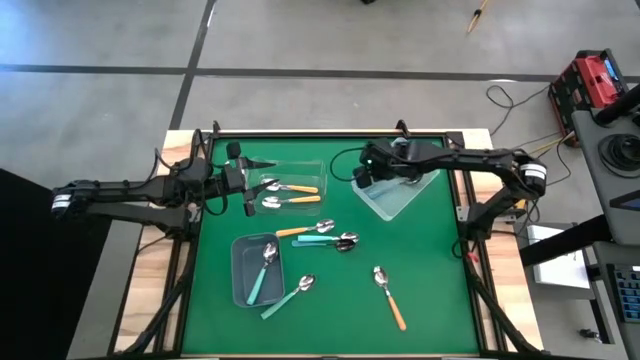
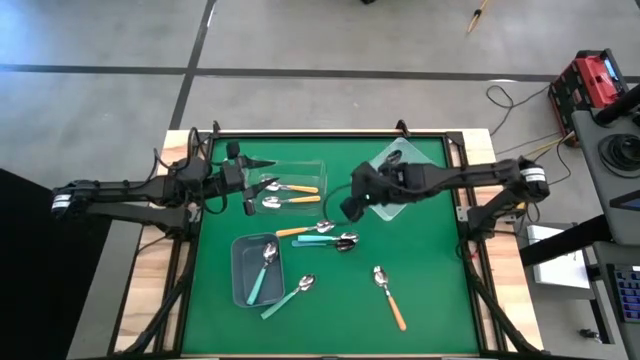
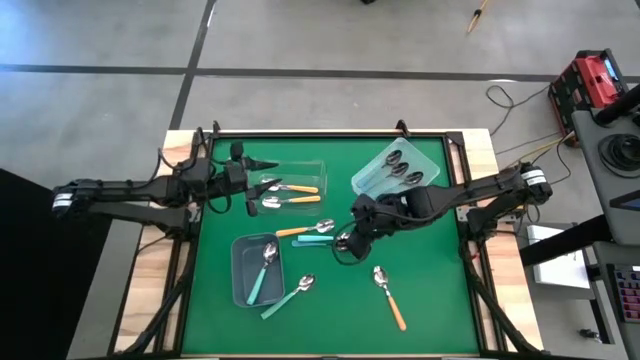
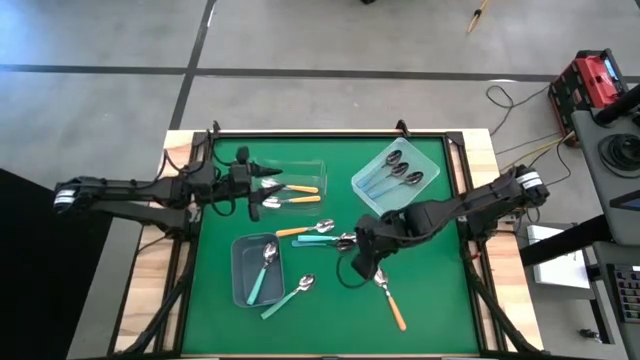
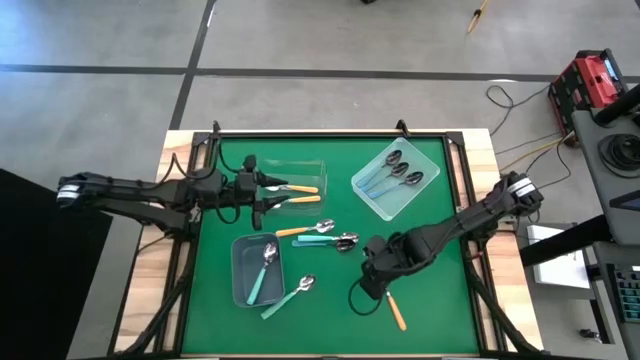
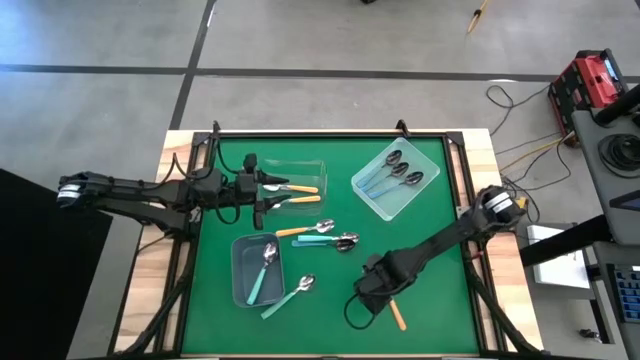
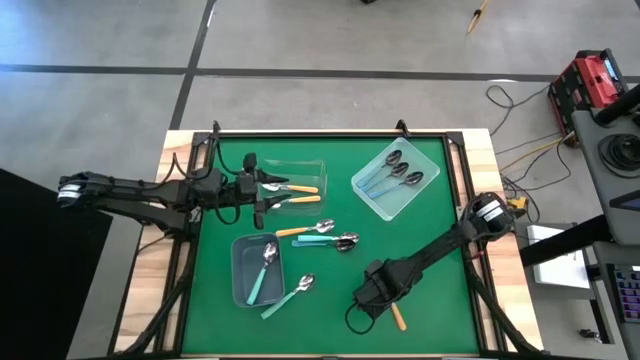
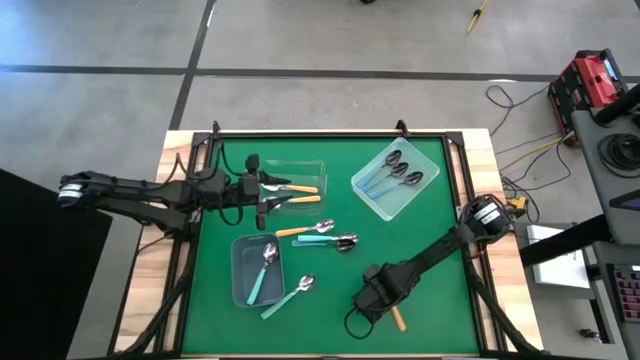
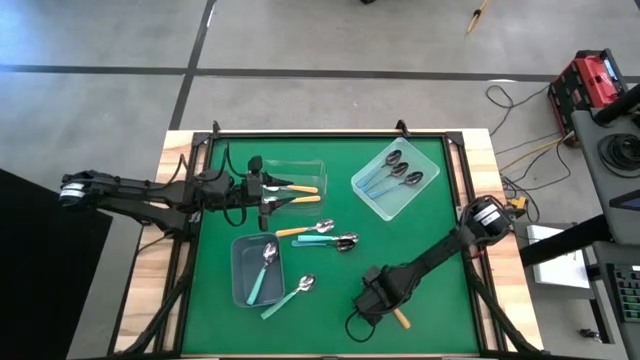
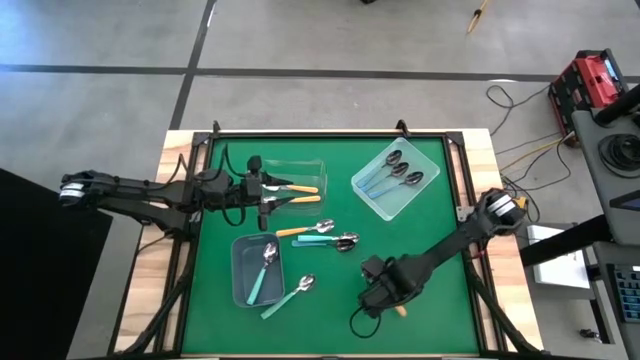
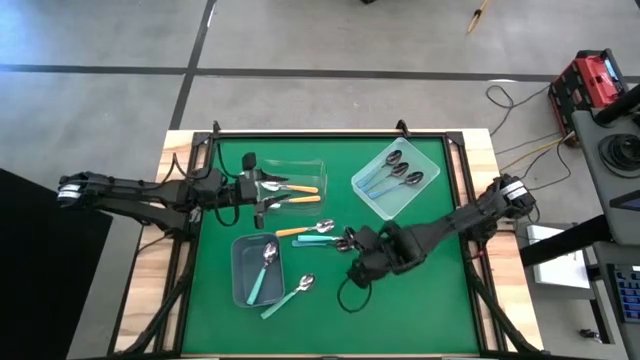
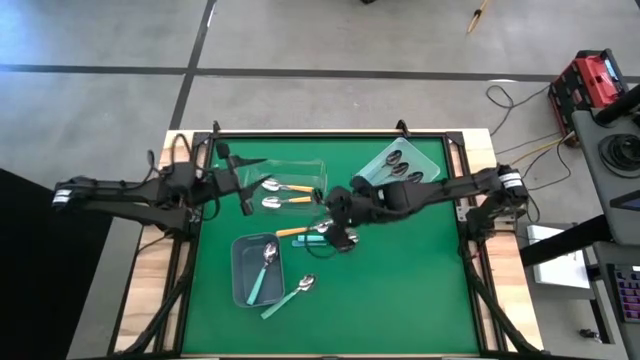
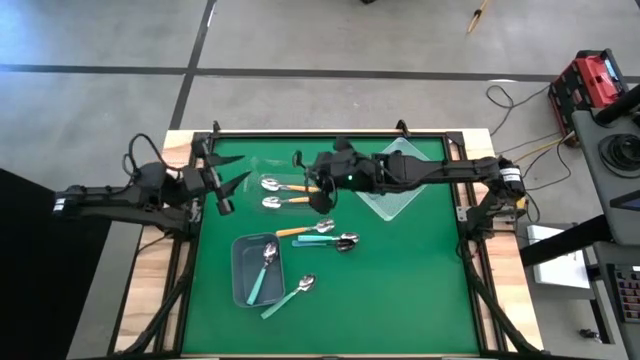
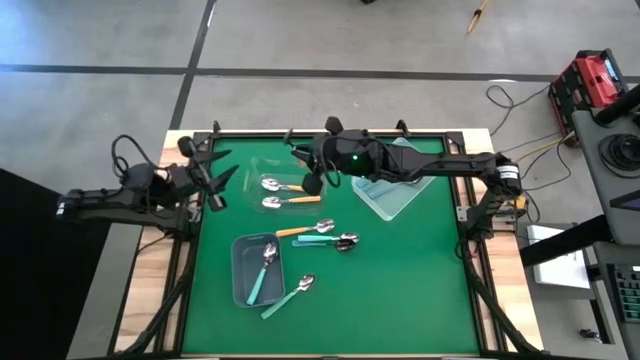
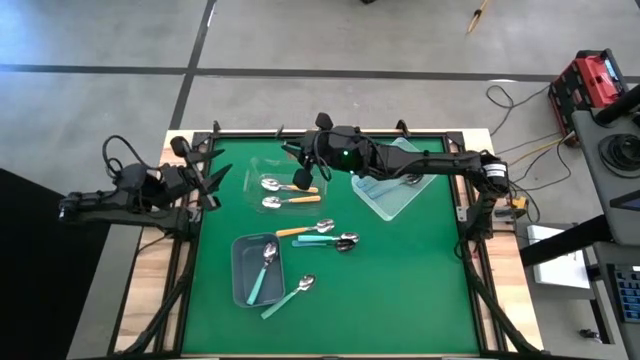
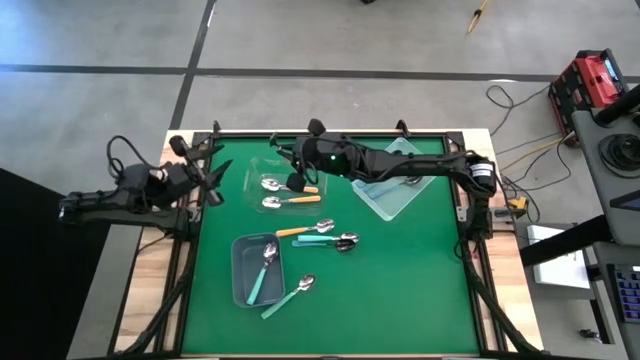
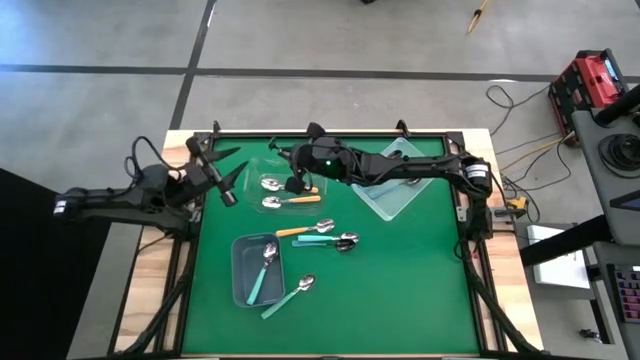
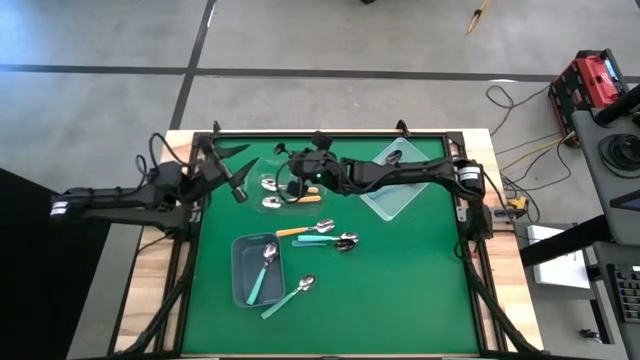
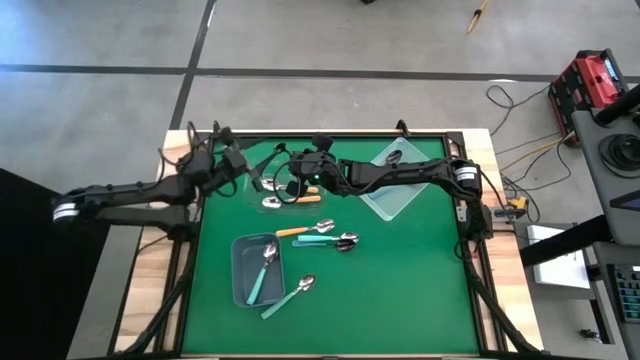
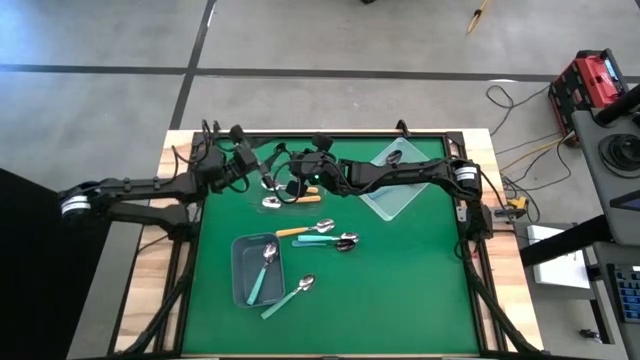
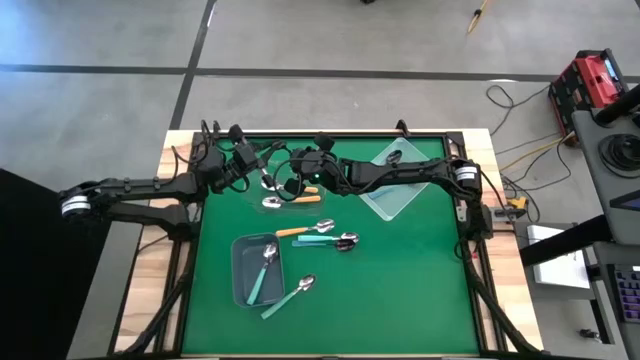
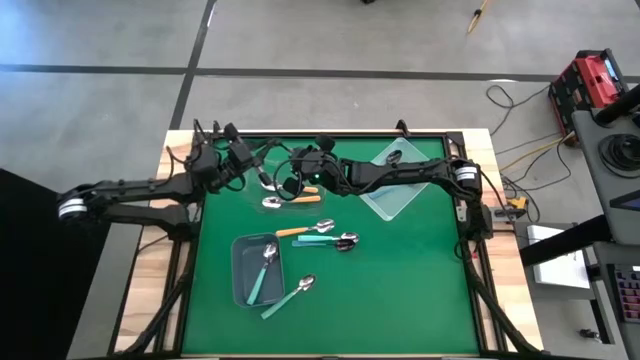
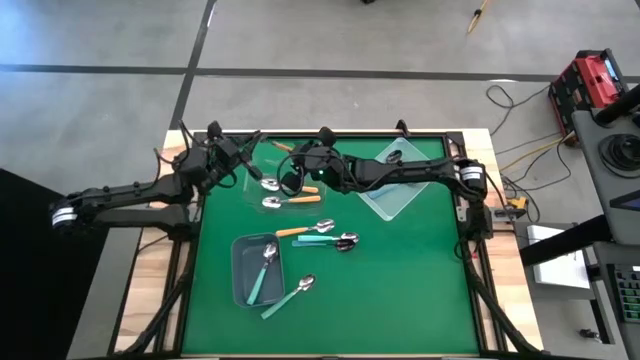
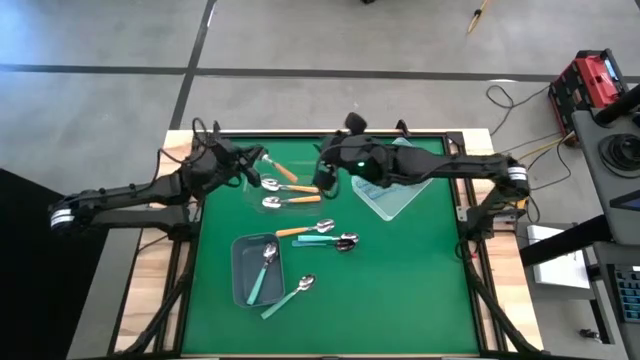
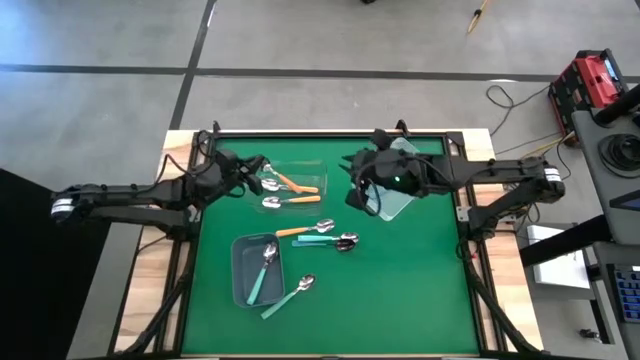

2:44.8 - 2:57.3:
Task: Sort silverware by color (type)
Put the orange spoon into the transparent bin

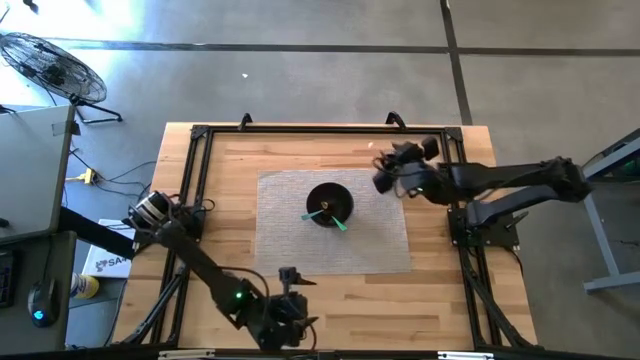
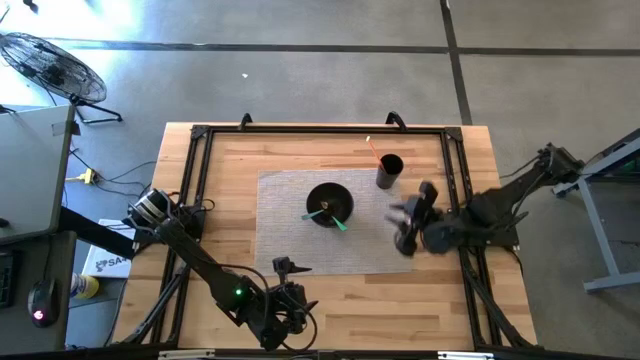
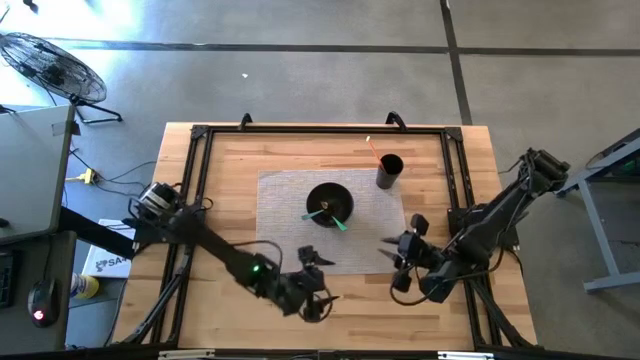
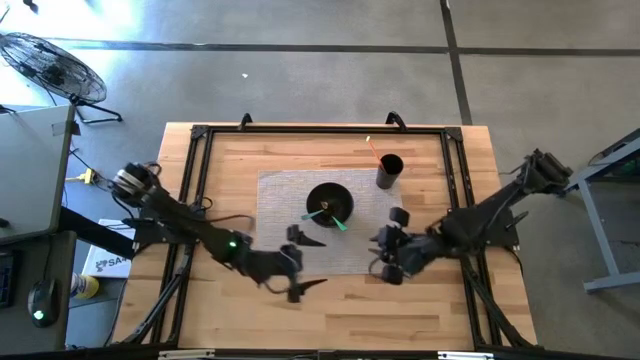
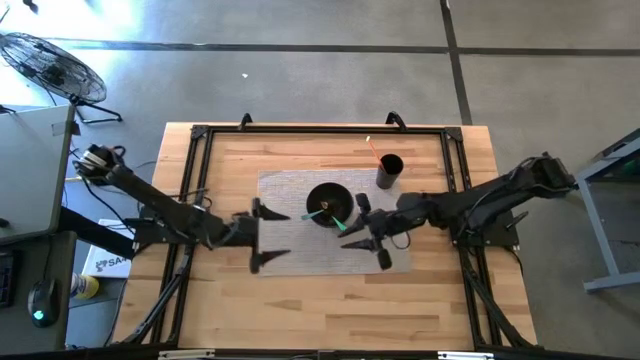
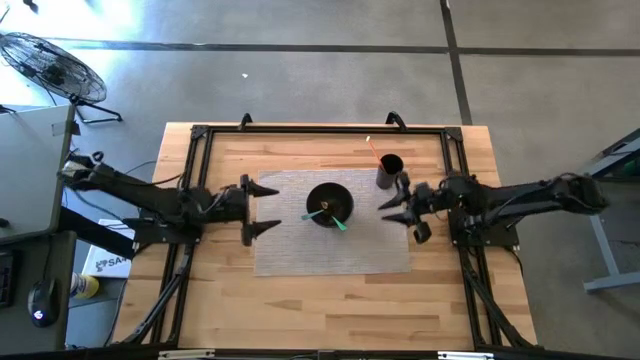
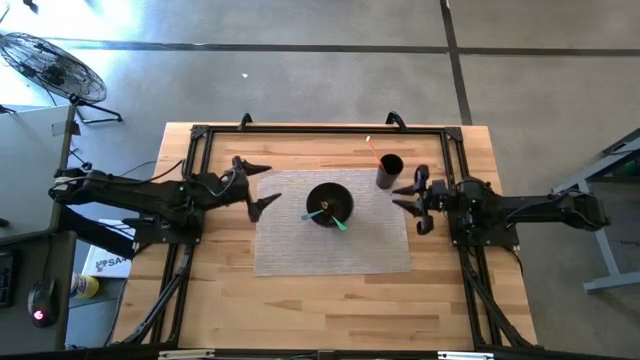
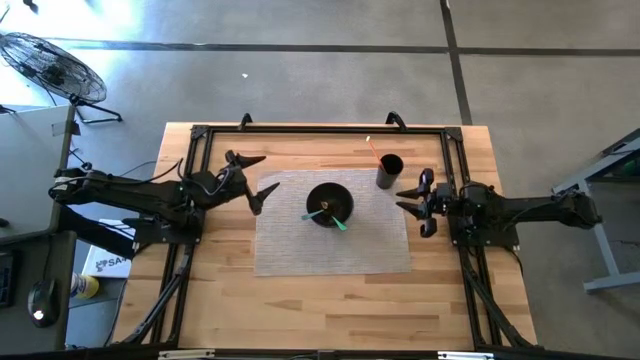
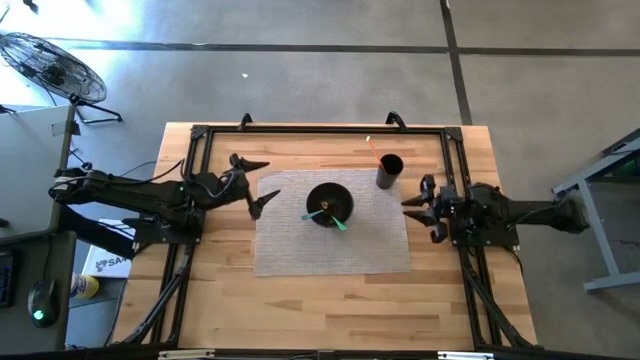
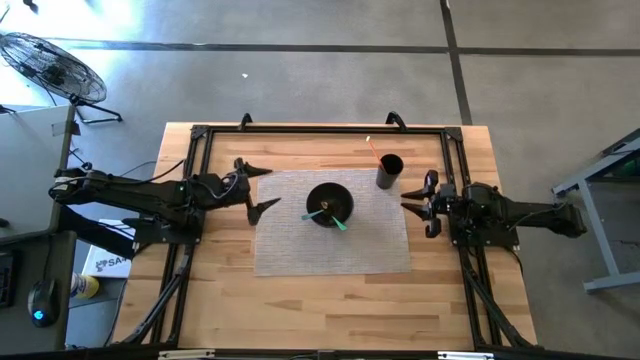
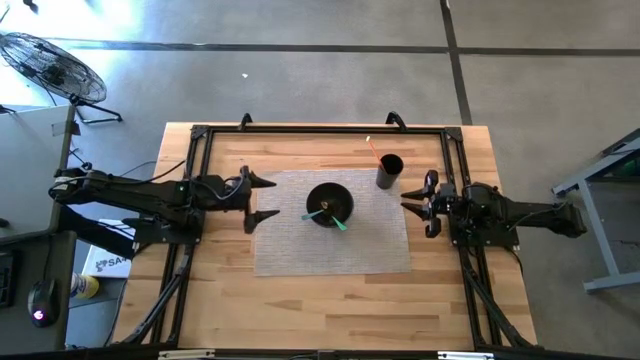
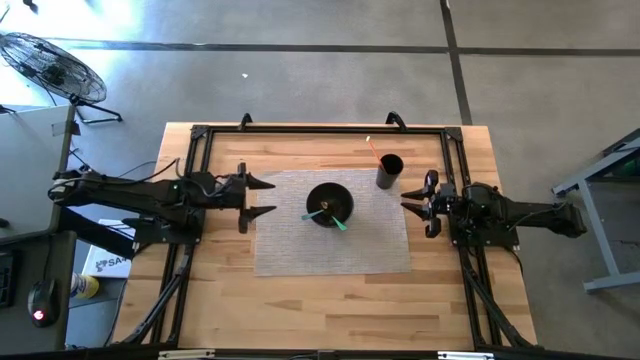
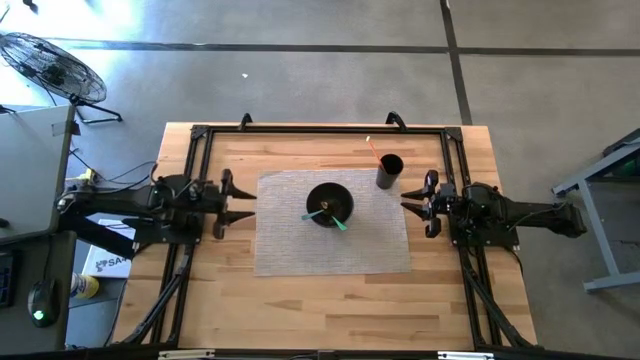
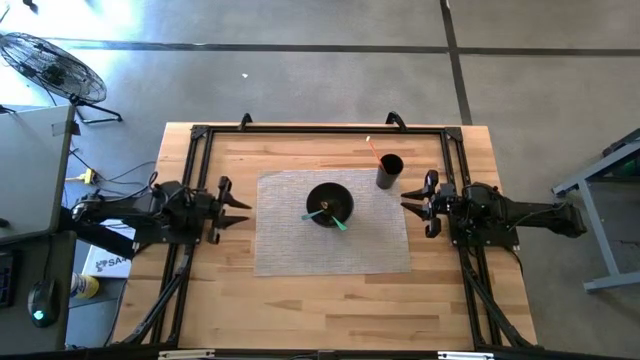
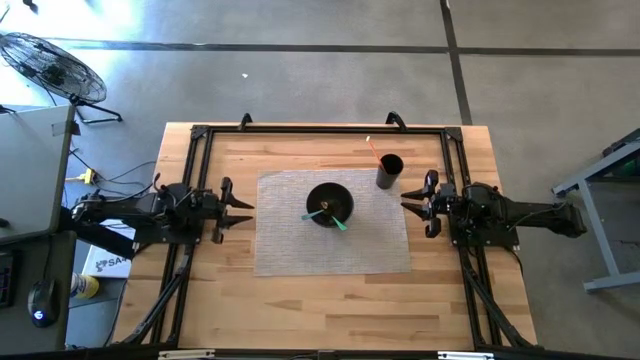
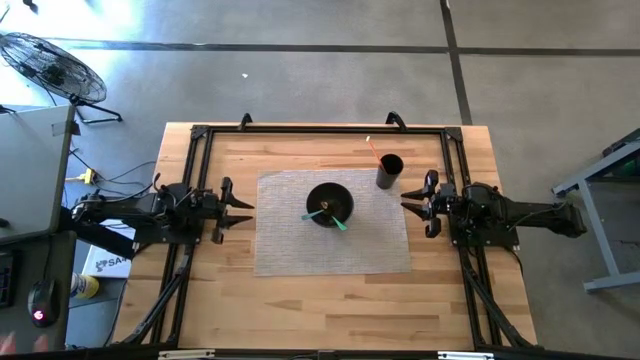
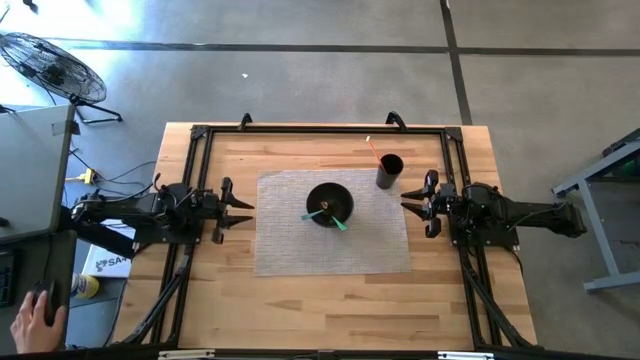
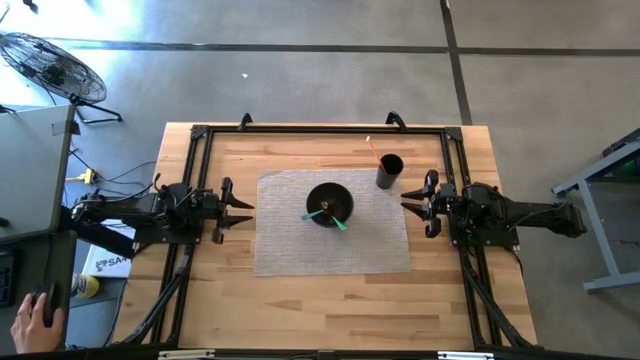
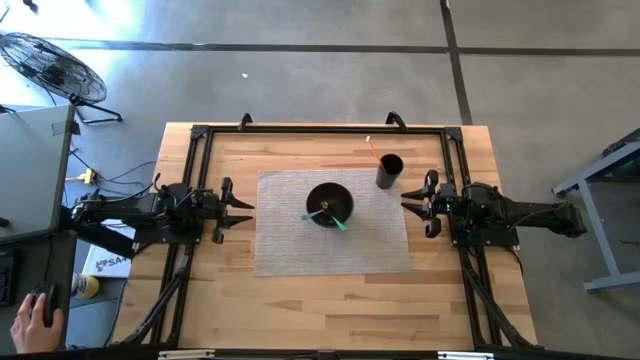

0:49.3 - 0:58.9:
Task: Pick & Place Utensil
Return to Home Position
